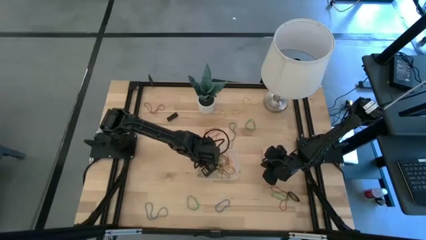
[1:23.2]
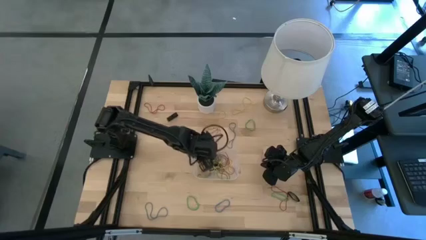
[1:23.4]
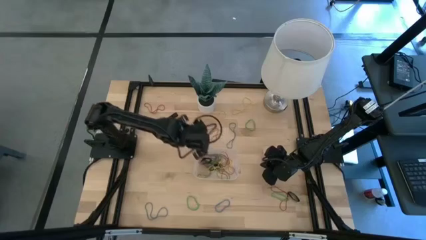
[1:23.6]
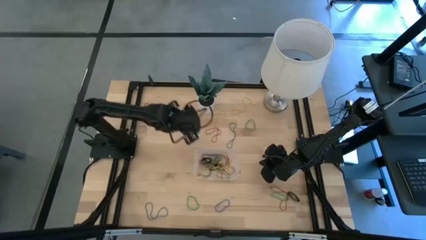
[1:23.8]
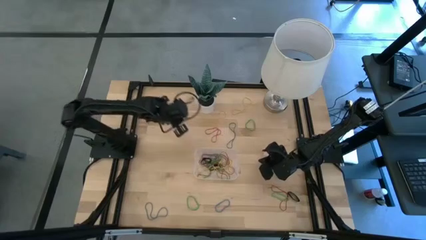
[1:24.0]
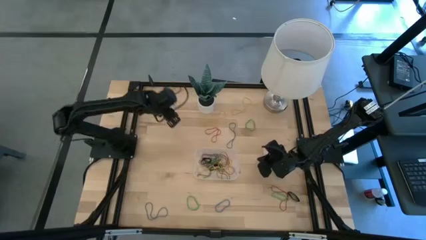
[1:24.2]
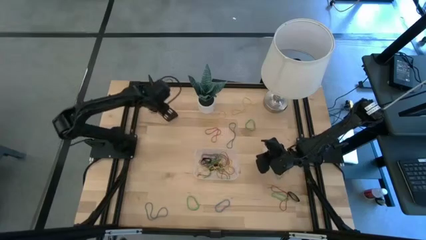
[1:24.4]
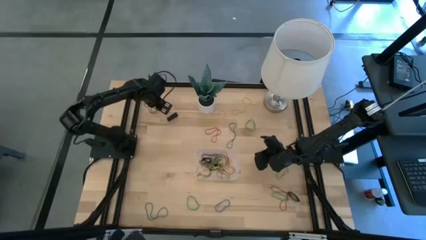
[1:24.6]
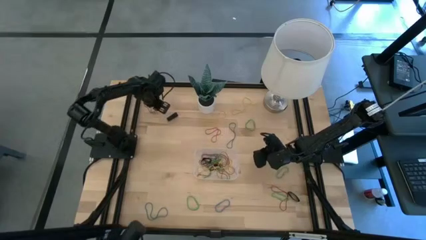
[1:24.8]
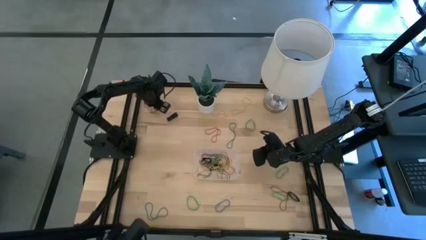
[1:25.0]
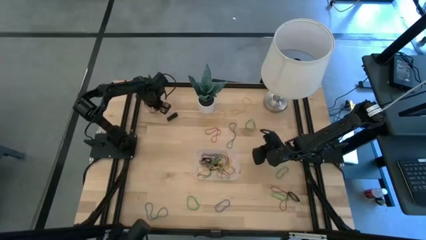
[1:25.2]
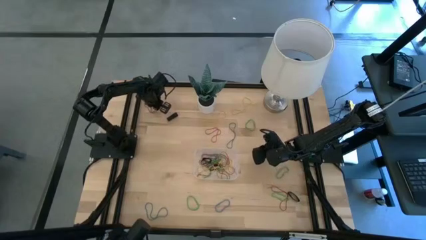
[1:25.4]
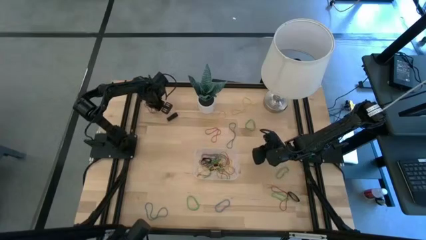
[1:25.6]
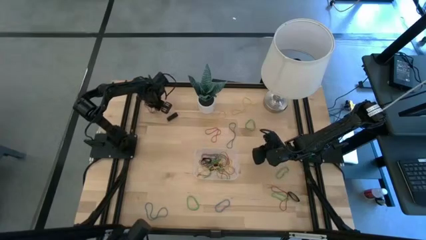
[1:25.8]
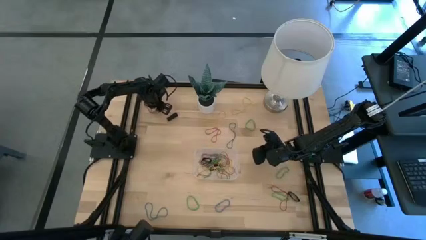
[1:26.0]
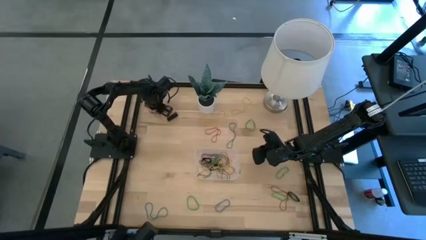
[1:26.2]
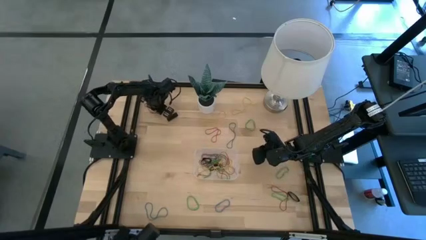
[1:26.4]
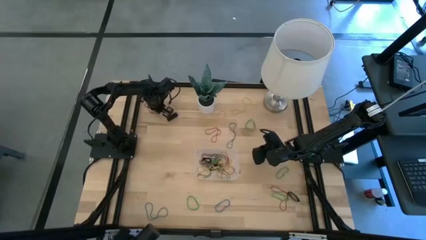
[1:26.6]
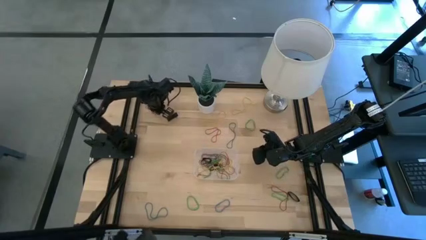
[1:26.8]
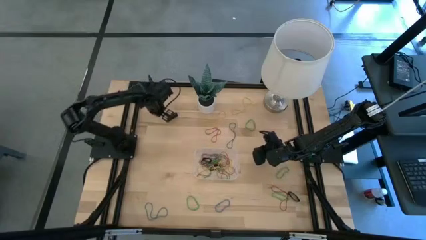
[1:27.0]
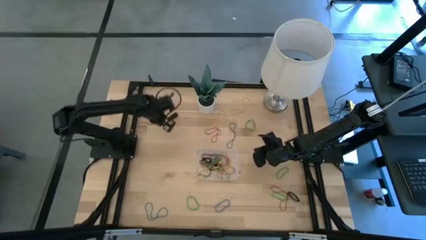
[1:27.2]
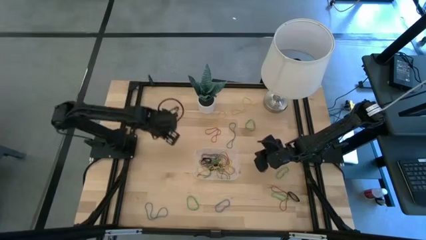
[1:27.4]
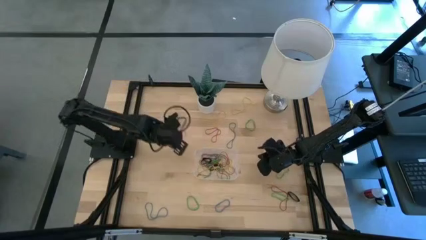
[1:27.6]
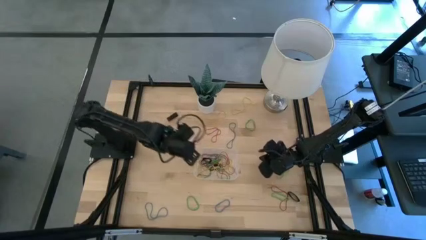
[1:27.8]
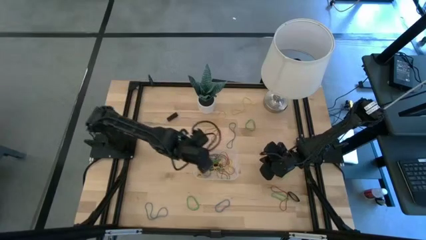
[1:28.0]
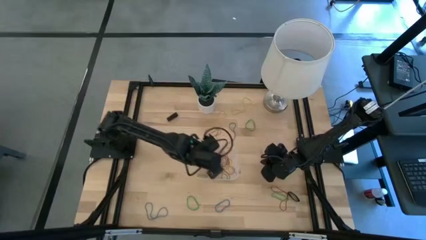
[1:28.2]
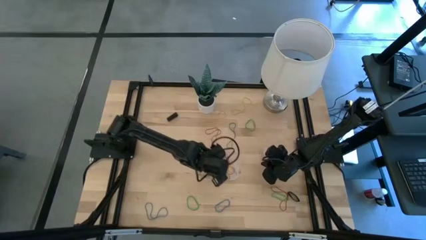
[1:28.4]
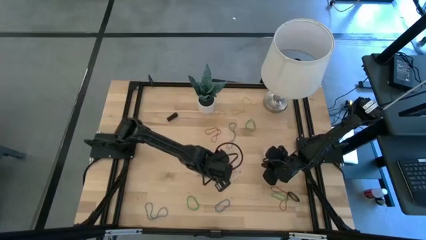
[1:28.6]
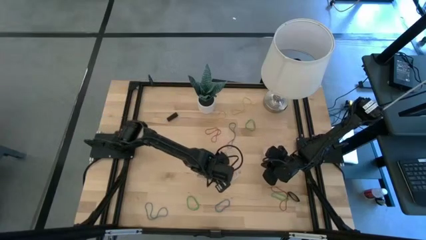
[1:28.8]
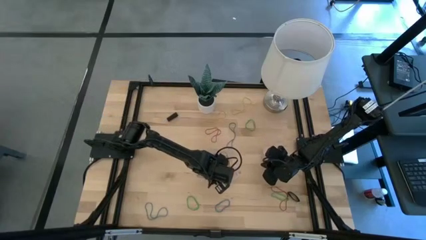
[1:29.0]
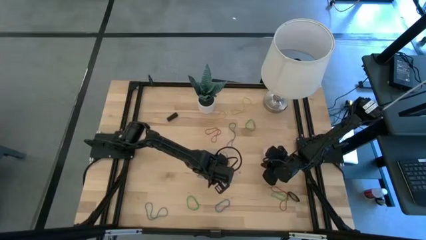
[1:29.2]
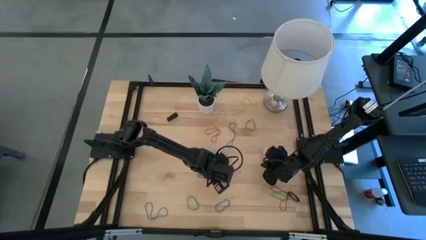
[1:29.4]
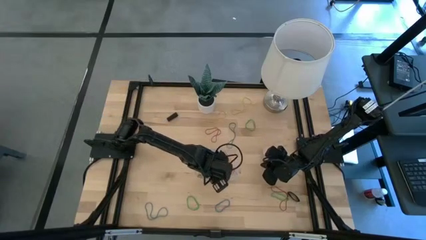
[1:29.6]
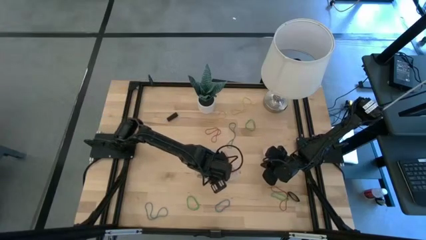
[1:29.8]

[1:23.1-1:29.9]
Task: Pick and place rubber bands into bin
Put the top red rubber band into the transparent bin

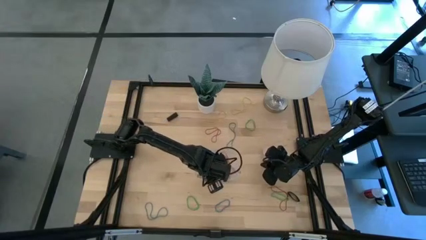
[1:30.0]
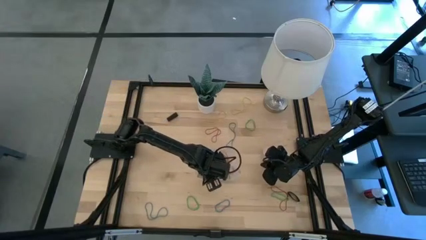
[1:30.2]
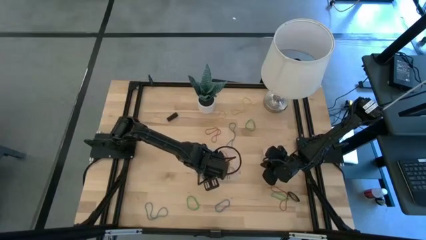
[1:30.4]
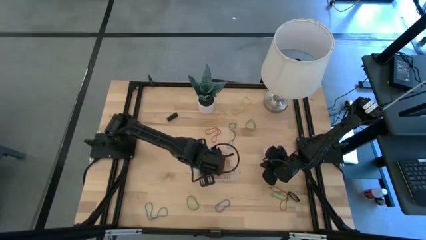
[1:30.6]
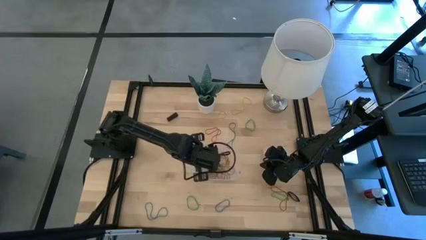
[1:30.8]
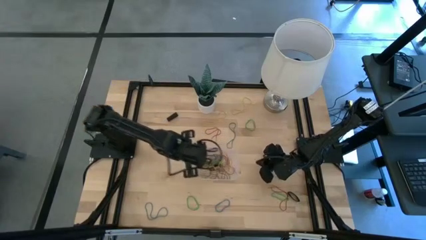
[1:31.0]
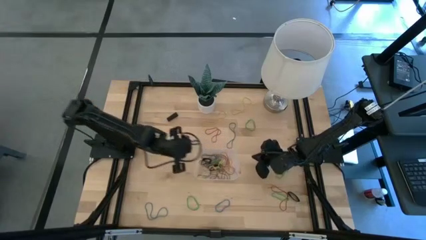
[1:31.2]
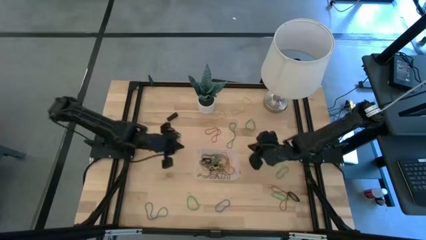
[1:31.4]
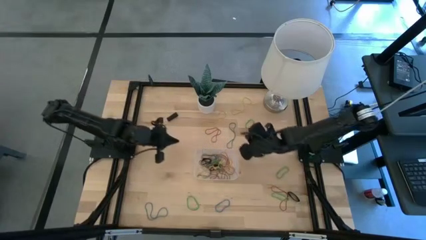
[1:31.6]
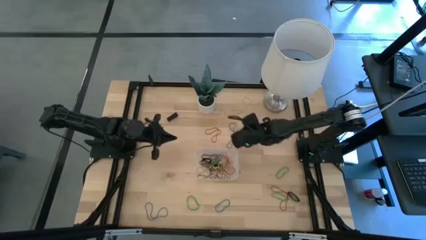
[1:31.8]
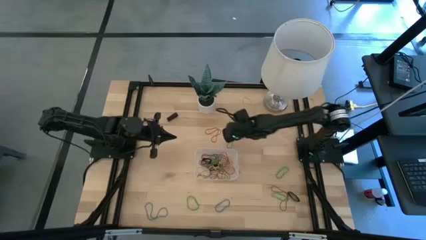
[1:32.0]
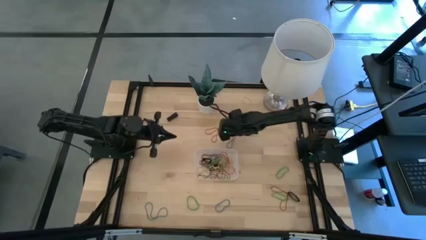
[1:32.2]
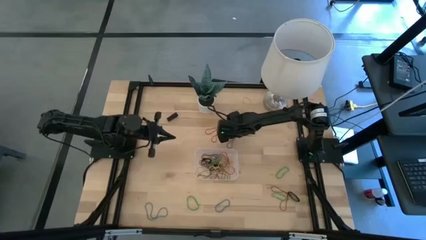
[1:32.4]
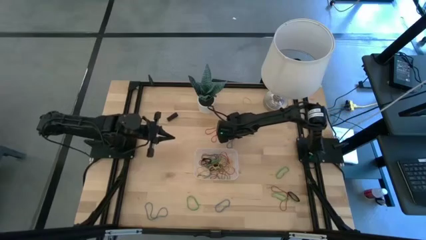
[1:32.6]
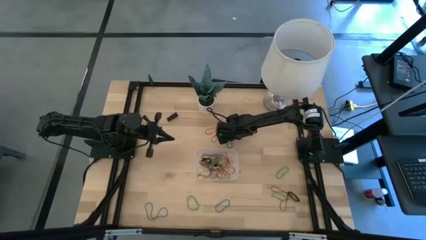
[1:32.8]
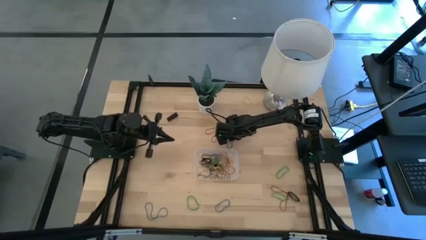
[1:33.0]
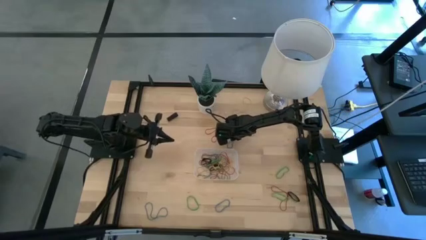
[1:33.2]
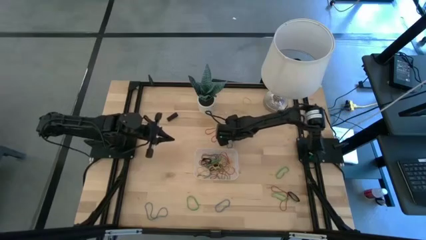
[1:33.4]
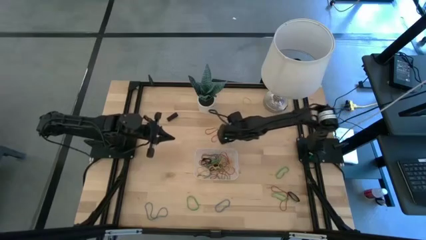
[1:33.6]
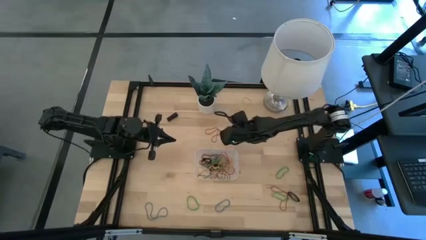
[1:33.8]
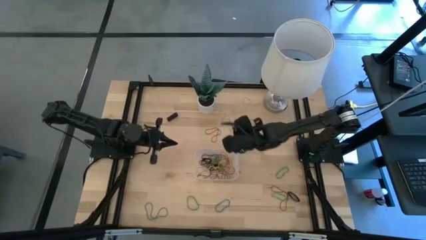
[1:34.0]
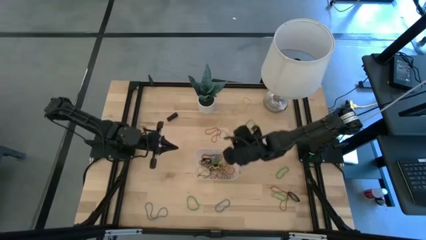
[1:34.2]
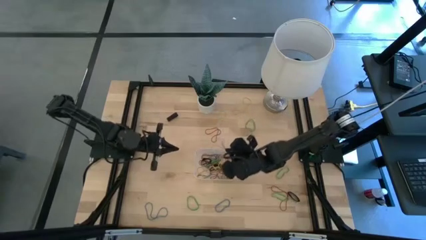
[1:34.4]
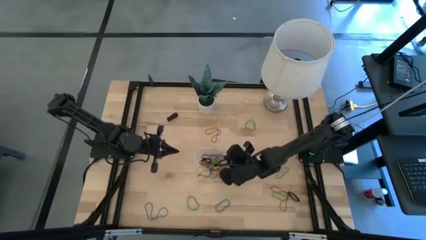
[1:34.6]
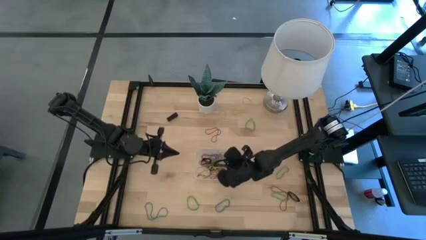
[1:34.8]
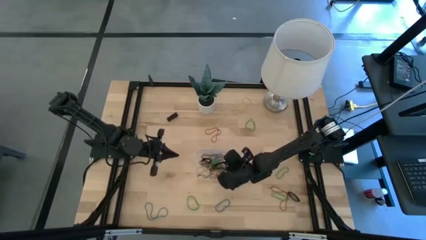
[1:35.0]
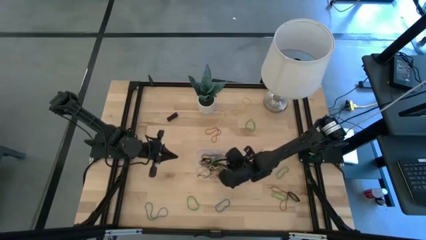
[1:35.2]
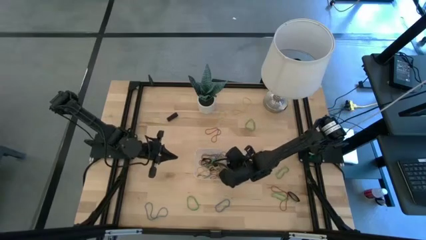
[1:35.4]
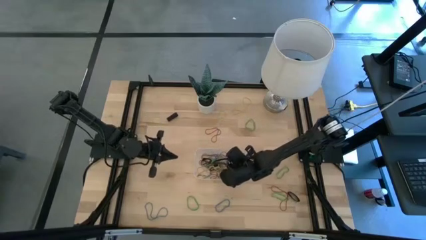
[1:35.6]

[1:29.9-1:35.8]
Put the top blue rubber band into the transparent bin

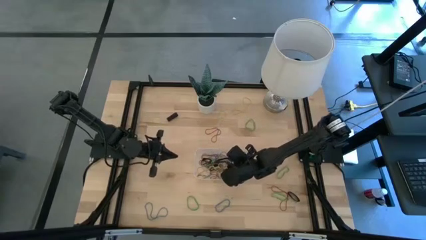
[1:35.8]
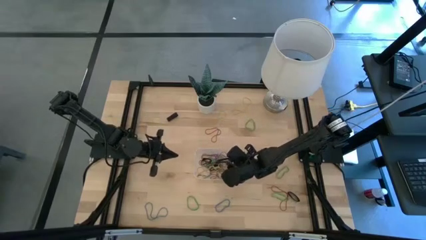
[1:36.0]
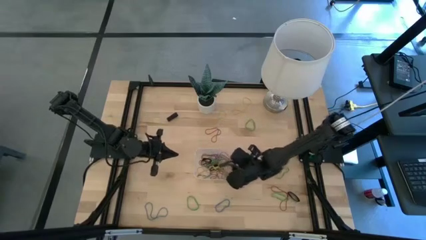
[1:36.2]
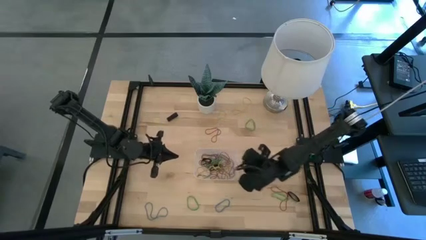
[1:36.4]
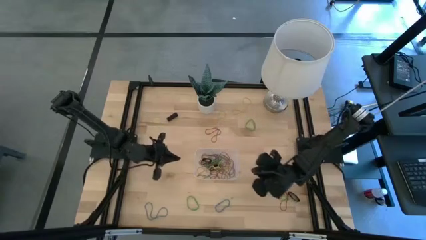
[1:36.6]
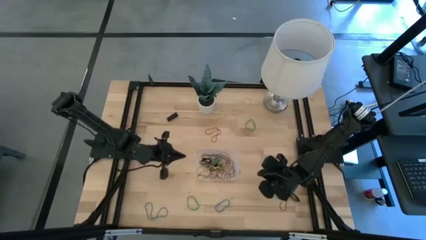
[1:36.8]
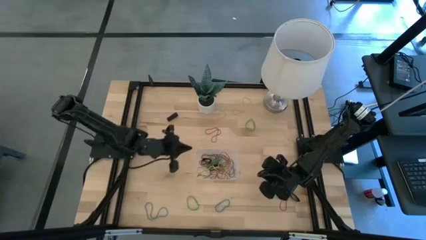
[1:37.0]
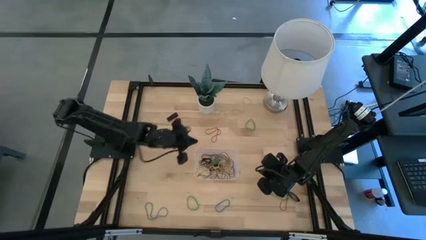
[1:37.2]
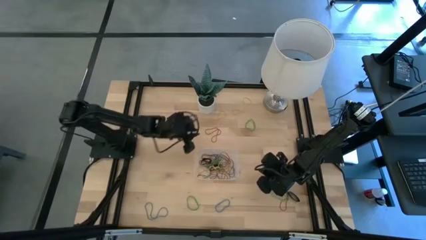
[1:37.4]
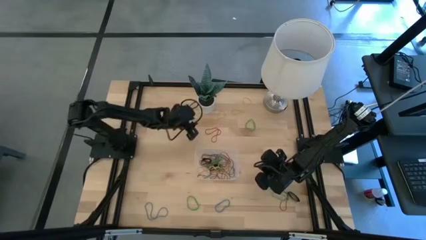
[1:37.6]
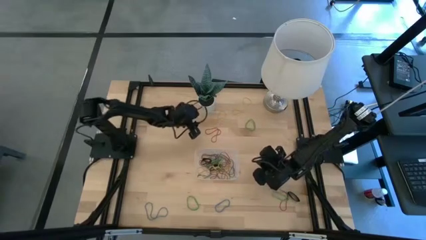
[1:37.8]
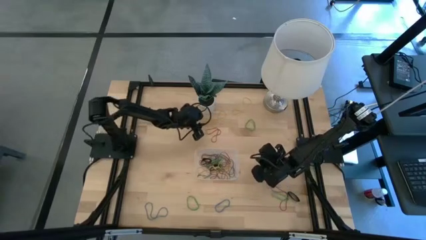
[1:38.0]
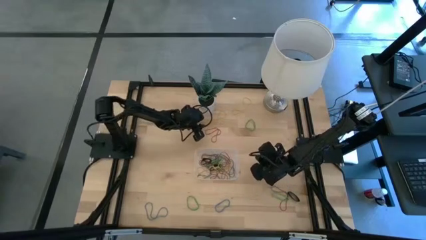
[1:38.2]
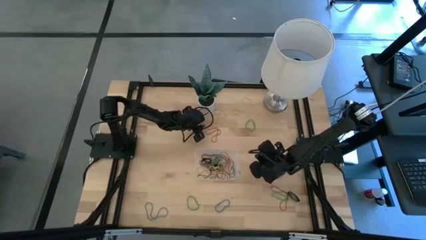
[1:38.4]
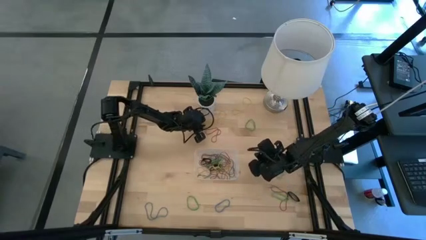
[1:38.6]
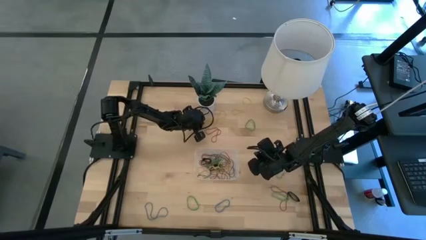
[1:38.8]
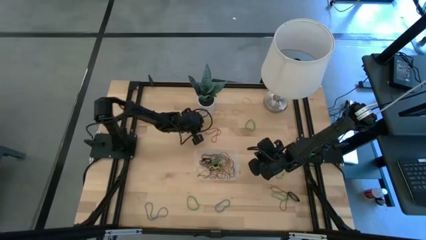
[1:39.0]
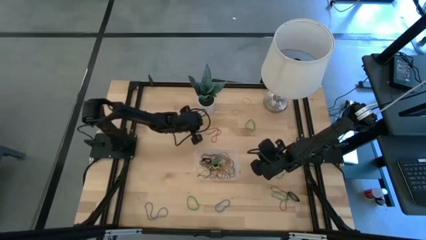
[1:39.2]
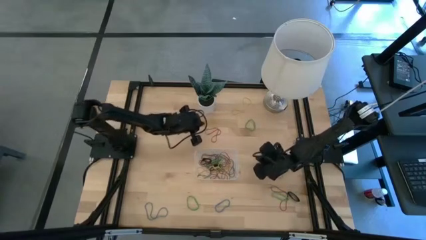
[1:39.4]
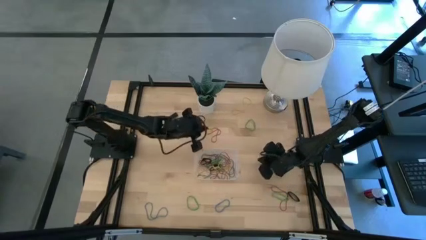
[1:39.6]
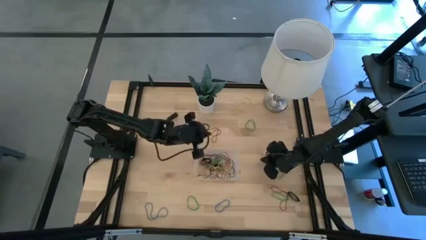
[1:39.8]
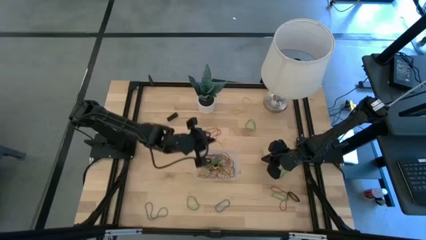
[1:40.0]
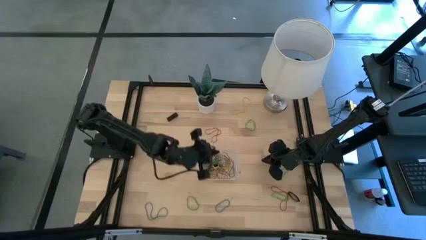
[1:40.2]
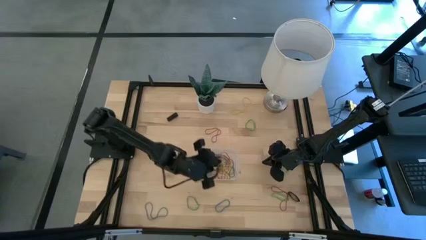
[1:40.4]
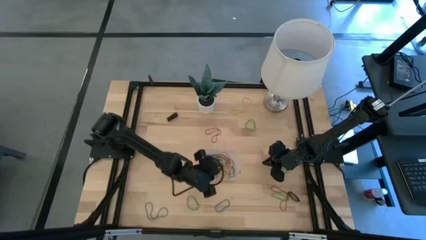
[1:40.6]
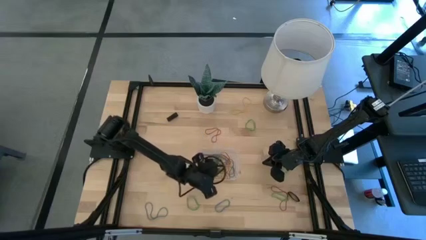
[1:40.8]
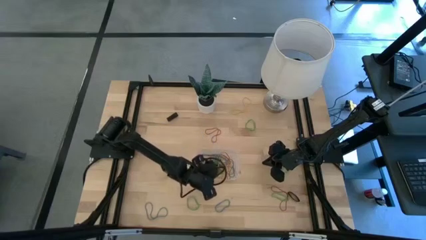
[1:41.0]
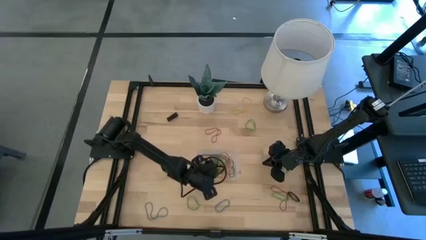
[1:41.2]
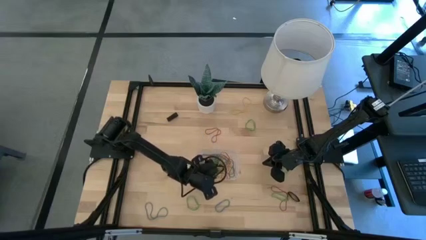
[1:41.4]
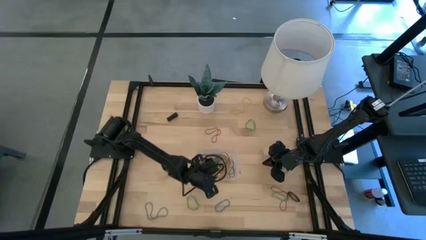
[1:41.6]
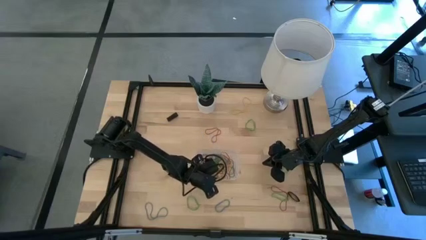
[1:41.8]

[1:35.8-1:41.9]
Put the left yellow rubber band into the transparent bin
